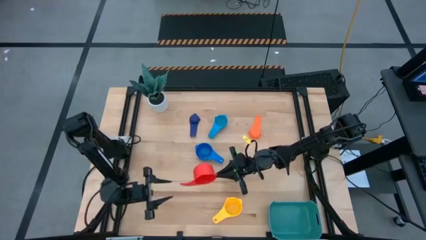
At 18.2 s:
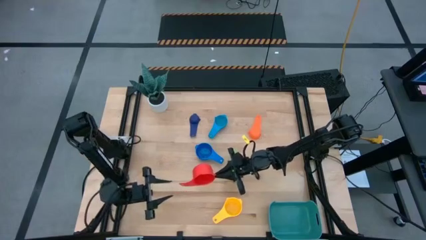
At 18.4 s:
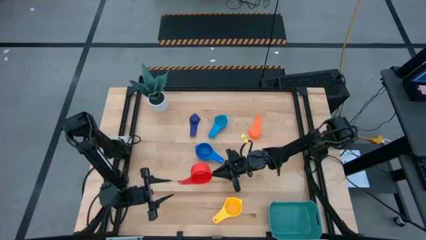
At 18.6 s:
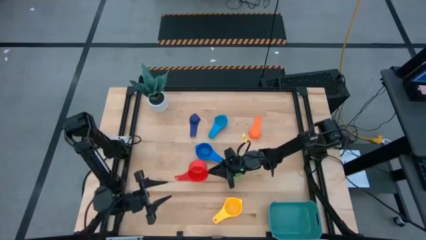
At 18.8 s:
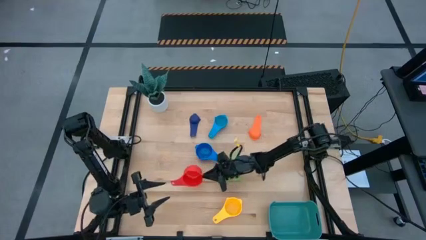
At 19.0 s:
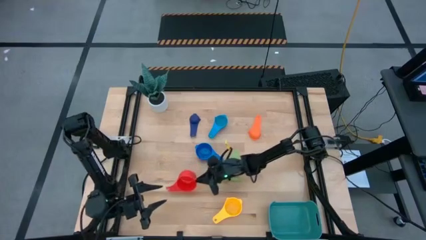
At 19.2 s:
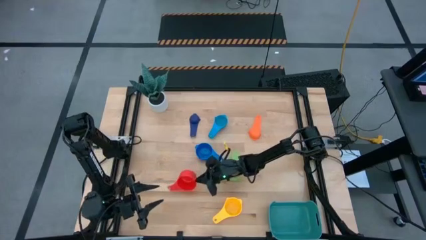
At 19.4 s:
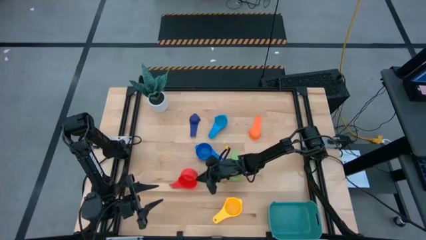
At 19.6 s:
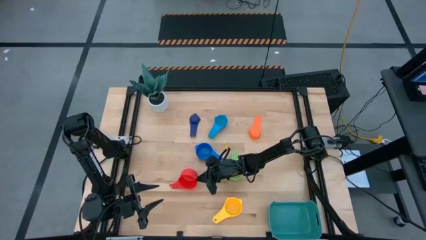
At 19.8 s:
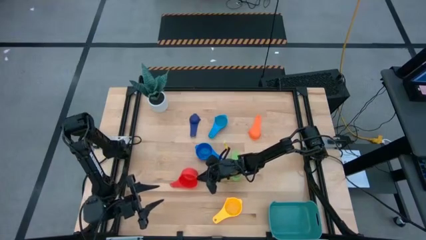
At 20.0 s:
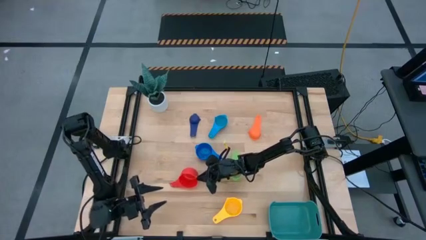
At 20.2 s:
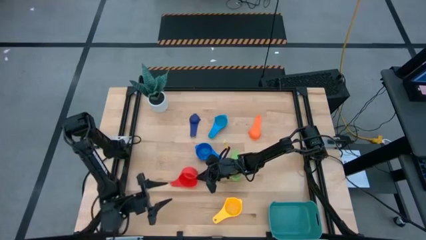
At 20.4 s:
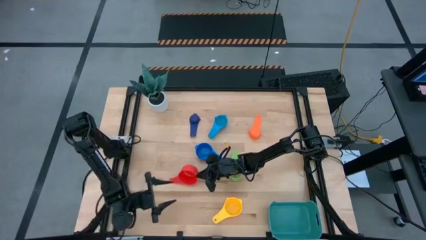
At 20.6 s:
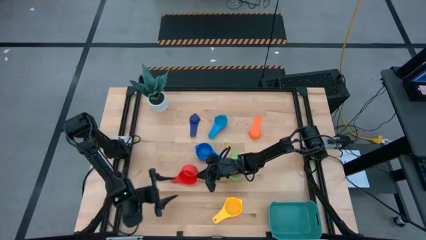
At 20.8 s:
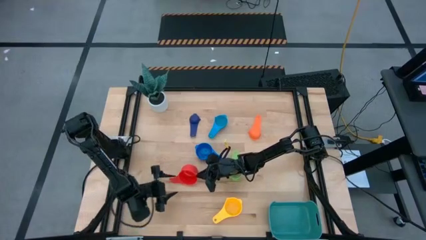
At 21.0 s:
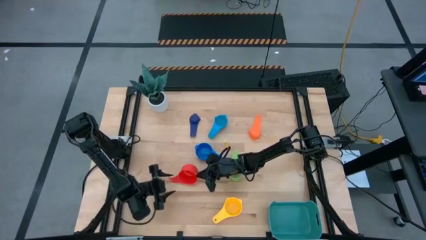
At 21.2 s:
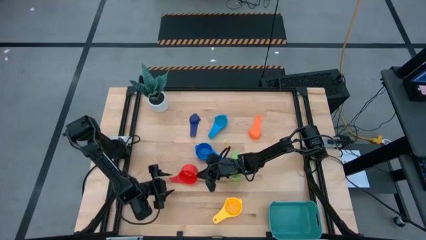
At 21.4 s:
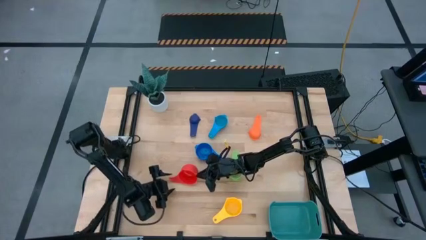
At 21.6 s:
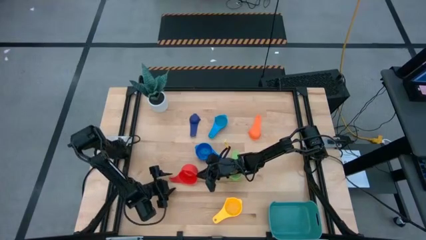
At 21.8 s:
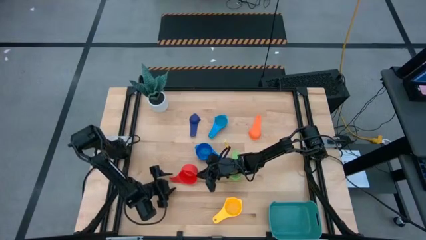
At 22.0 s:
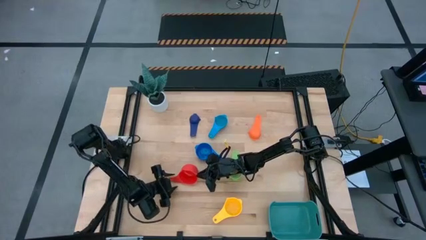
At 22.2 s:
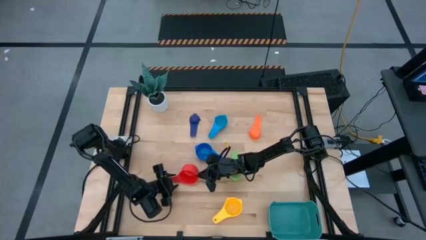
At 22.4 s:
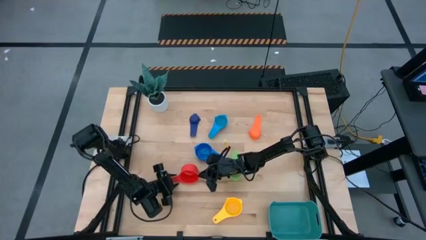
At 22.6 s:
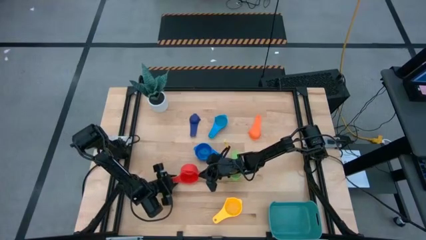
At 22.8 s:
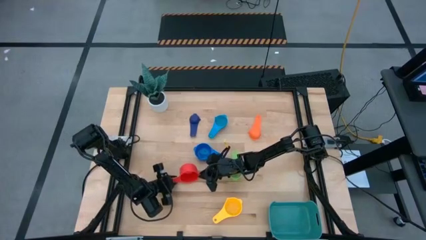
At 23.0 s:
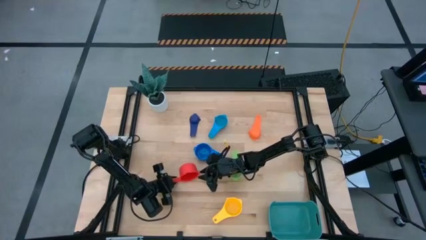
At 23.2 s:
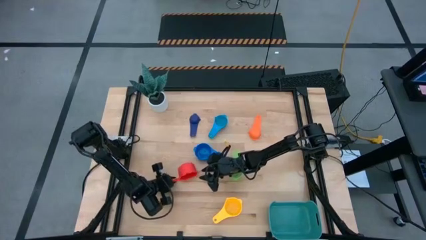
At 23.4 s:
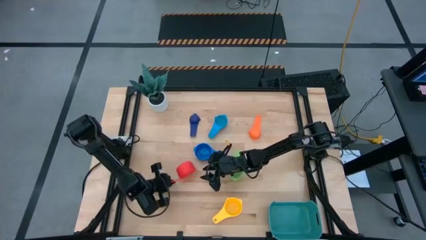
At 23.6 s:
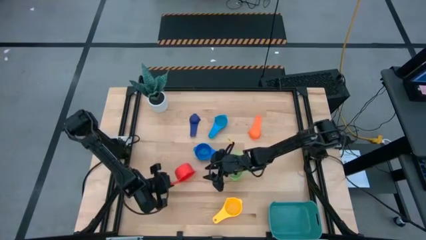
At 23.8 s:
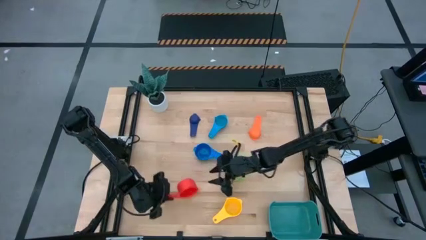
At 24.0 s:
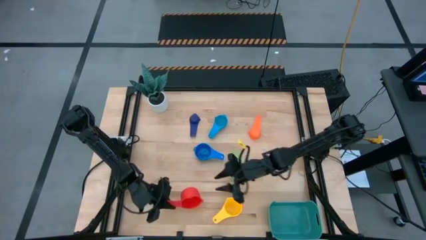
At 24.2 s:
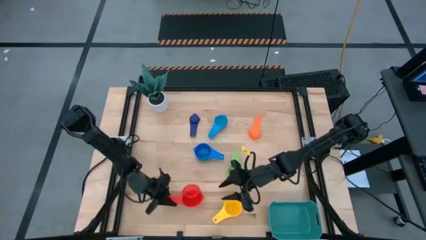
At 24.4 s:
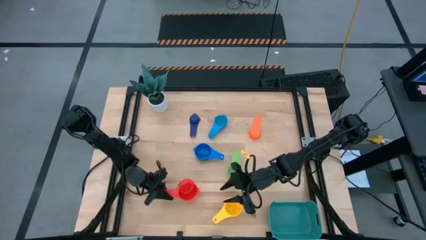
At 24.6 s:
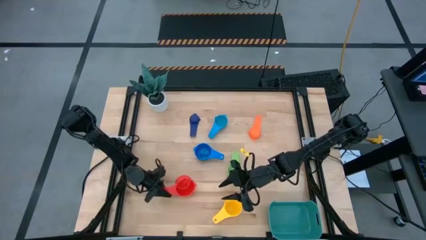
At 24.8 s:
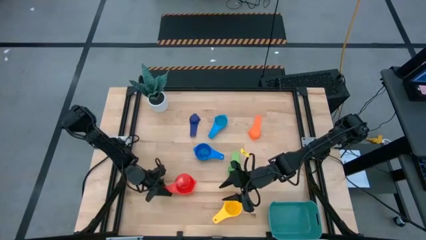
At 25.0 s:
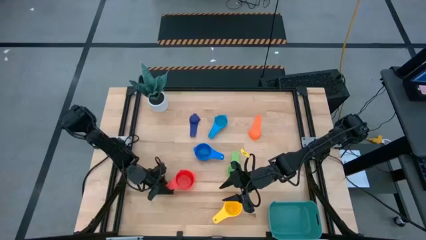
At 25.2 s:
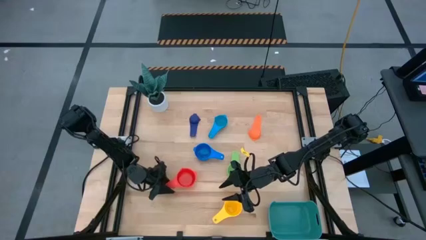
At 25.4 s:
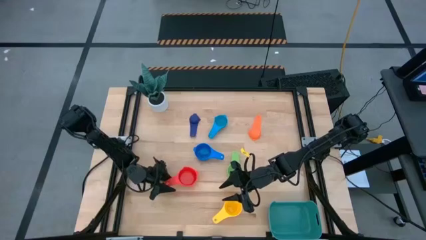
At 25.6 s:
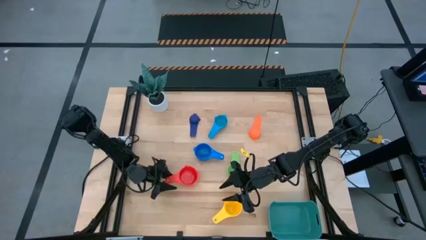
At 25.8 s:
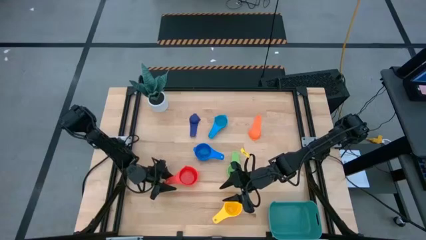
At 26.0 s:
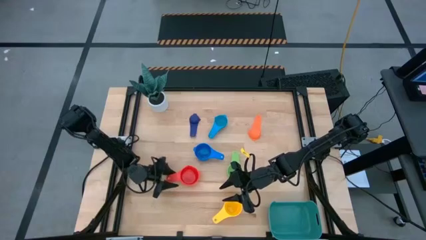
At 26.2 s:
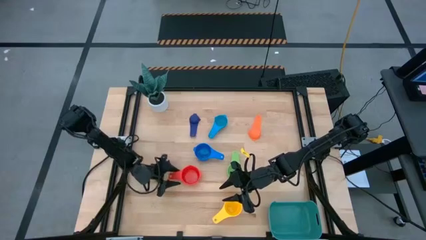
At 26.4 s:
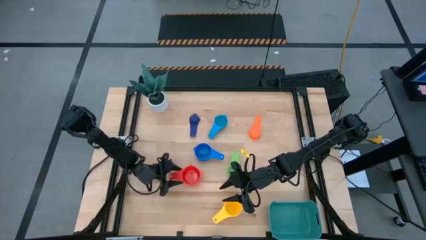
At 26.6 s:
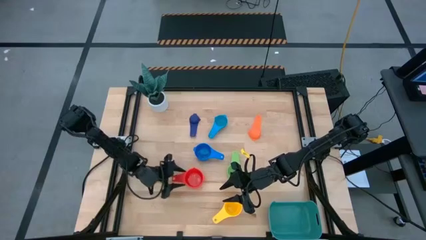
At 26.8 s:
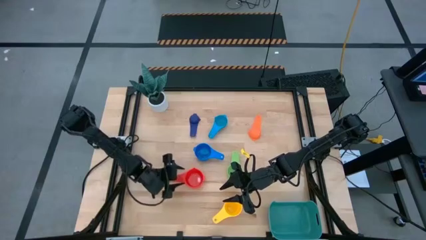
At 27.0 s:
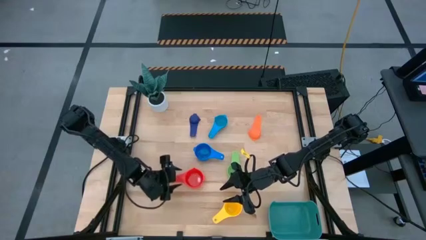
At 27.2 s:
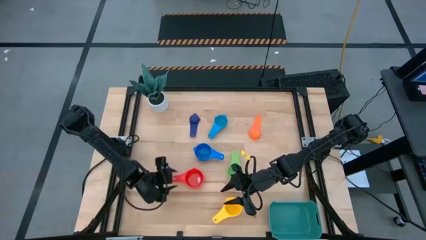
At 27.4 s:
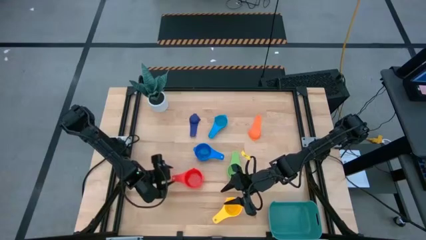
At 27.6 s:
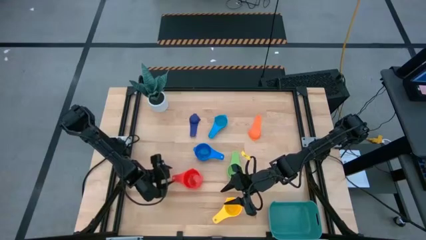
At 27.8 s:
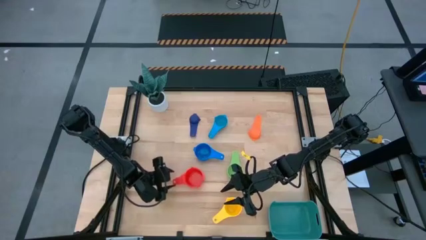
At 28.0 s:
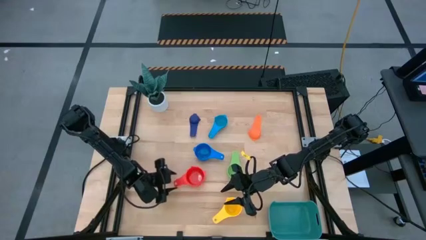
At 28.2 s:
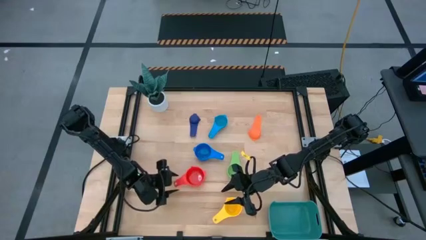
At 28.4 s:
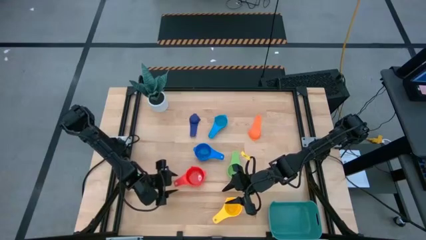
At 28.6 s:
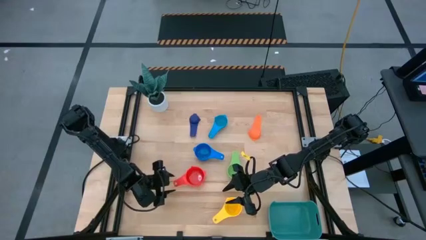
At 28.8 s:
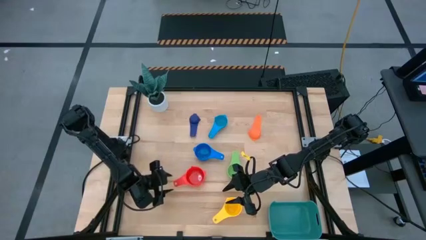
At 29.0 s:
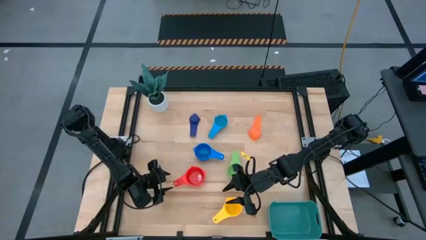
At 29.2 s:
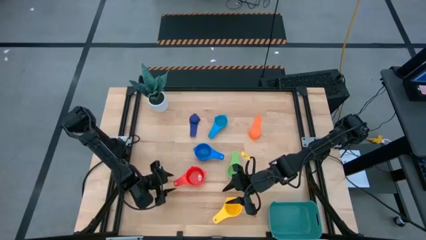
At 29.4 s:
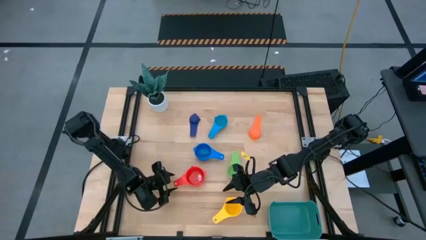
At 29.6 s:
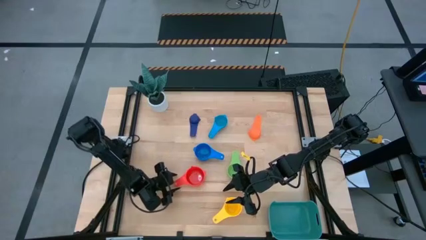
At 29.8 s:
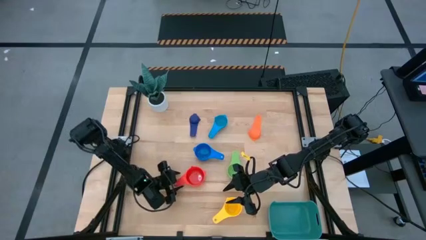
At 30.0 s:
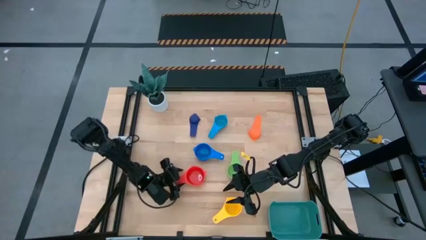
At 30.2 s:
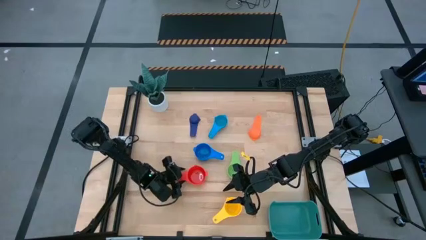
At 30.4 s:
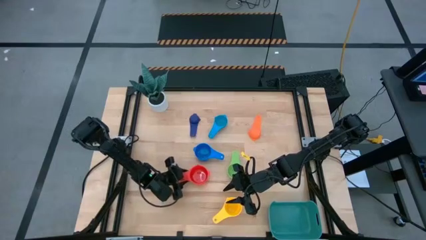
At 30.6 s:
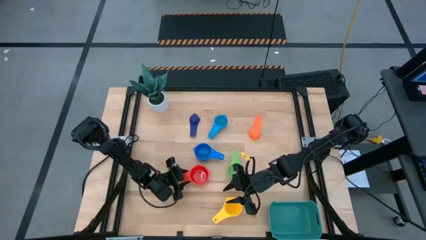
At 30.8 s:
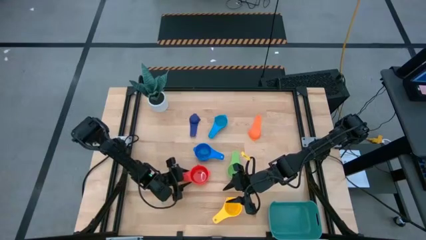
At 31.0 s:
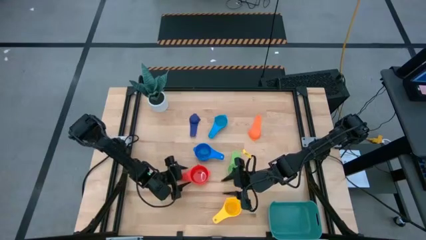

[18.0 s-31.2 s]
Task: Nest measuring cups in basket
Adjust the red measuring cup
